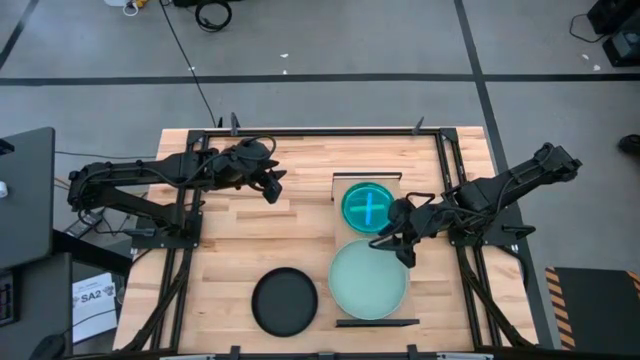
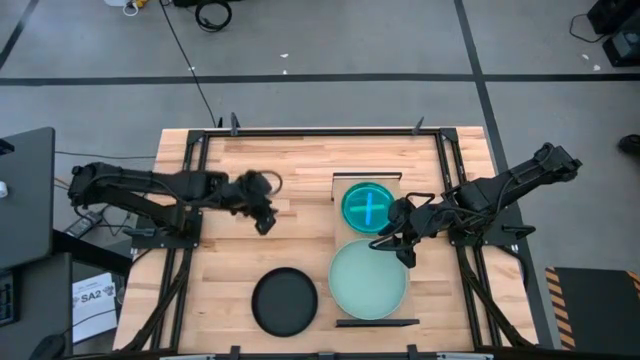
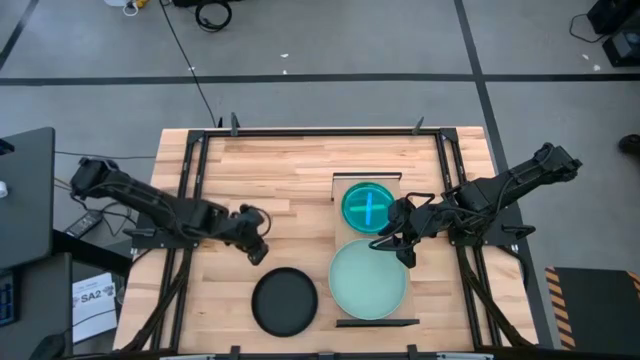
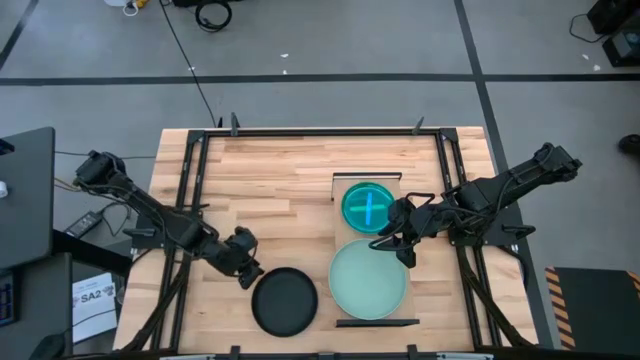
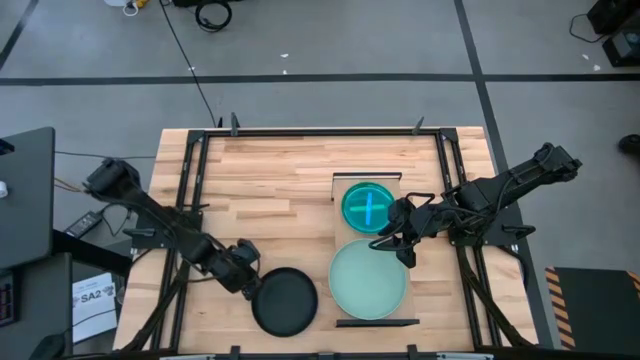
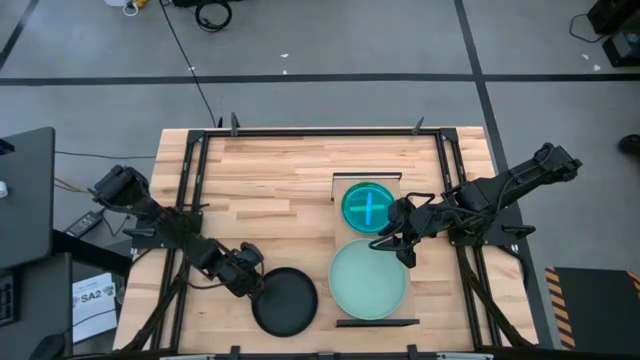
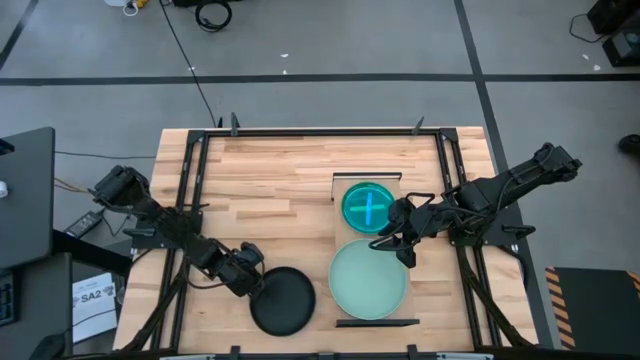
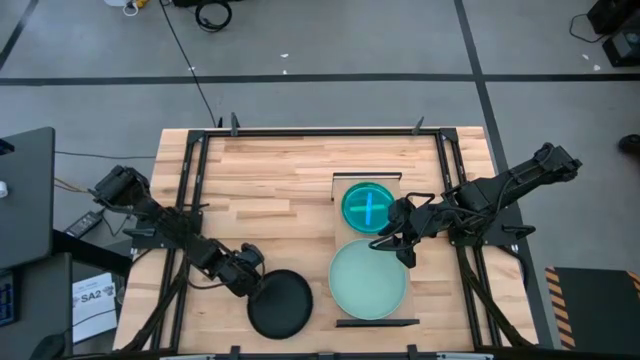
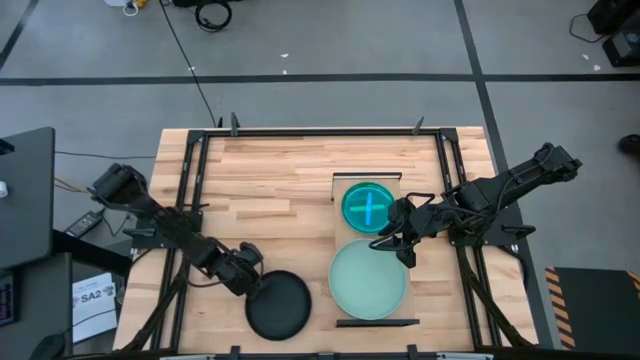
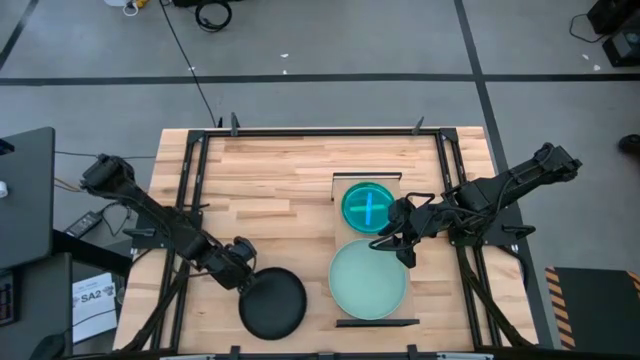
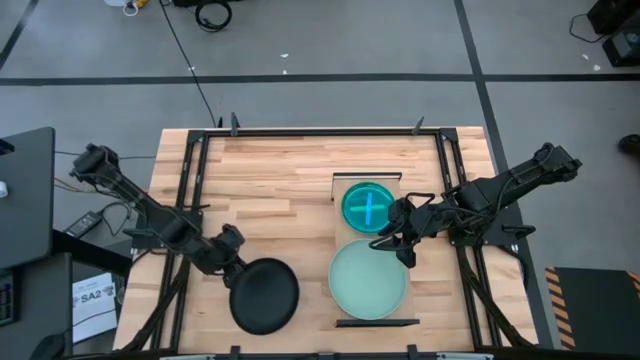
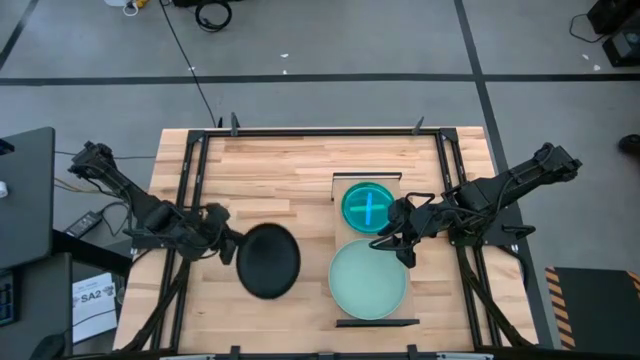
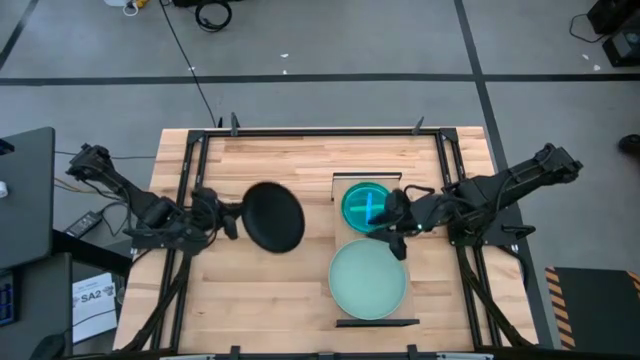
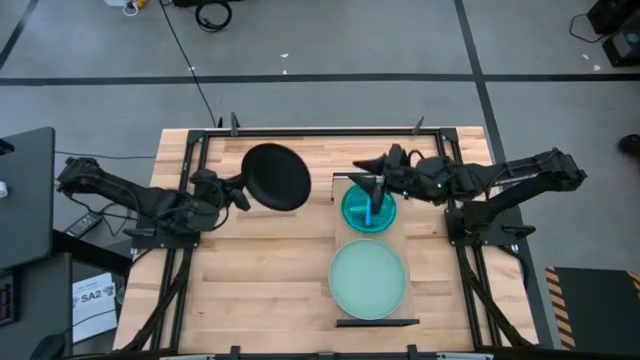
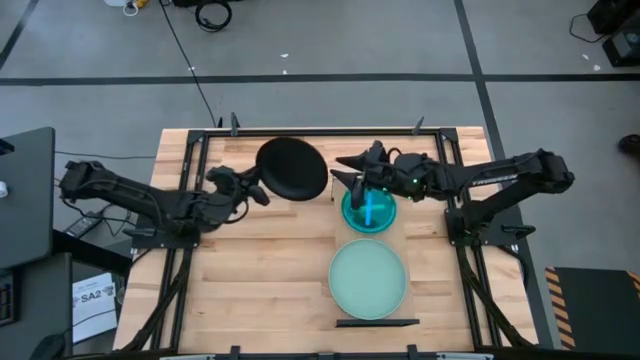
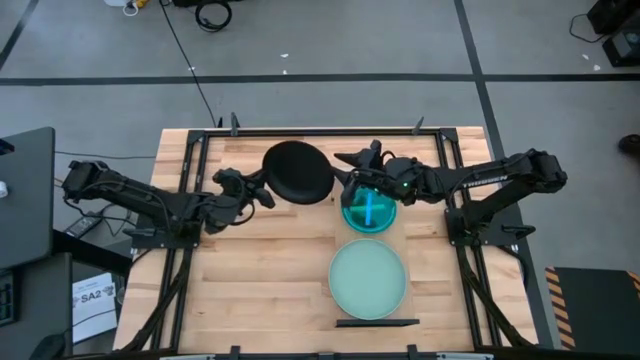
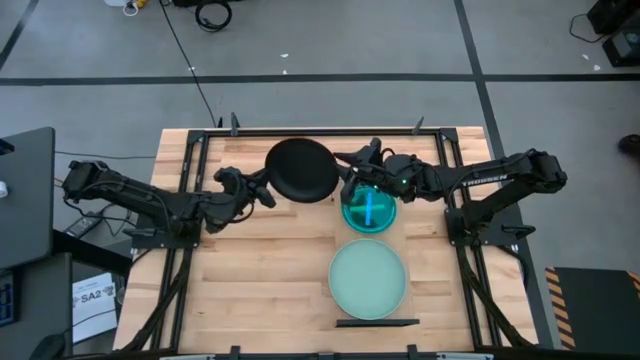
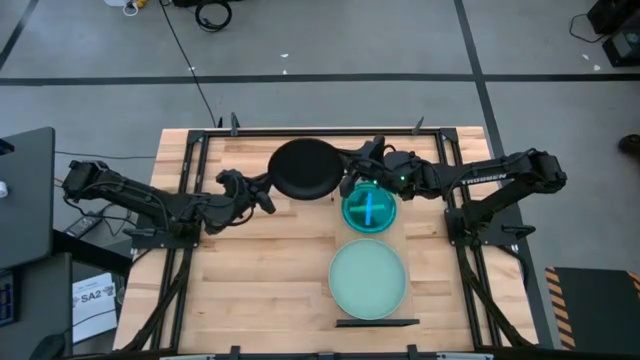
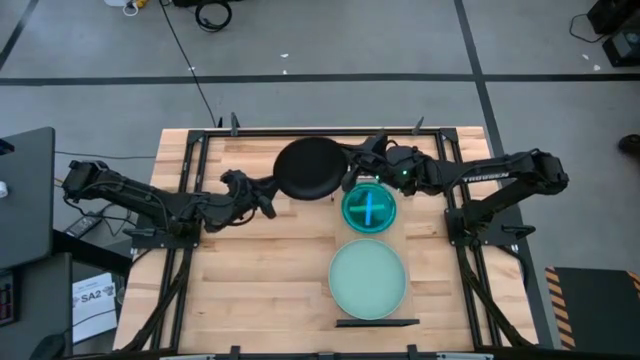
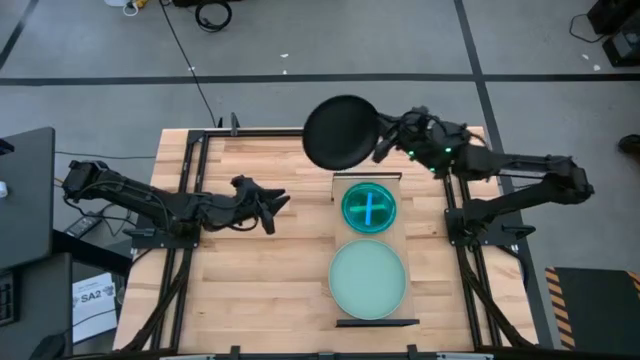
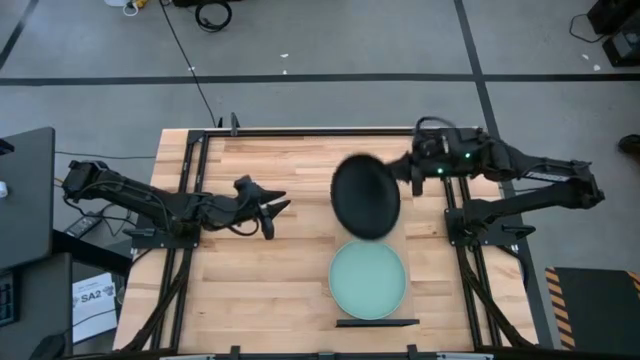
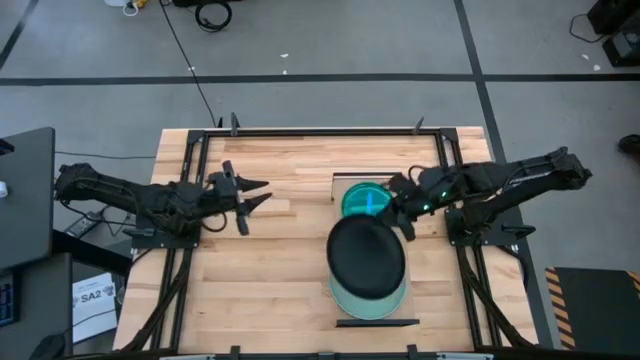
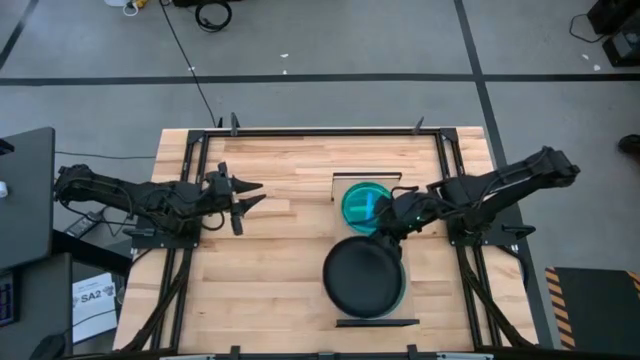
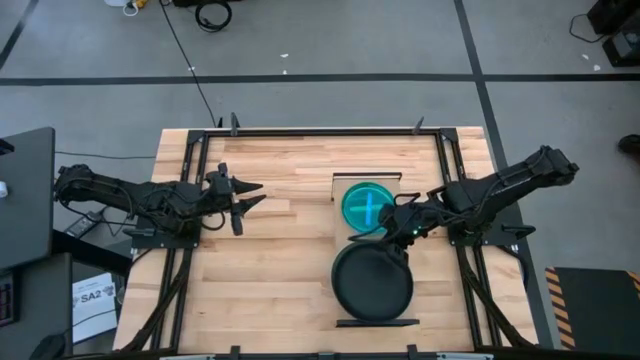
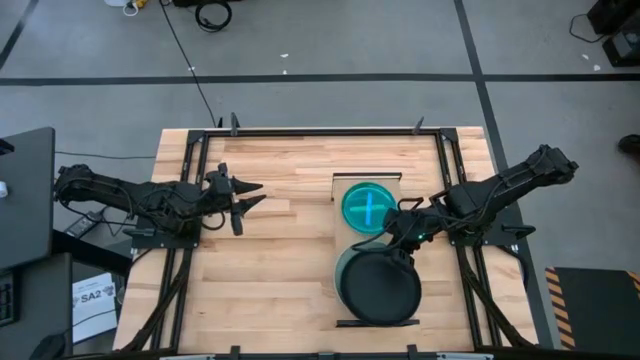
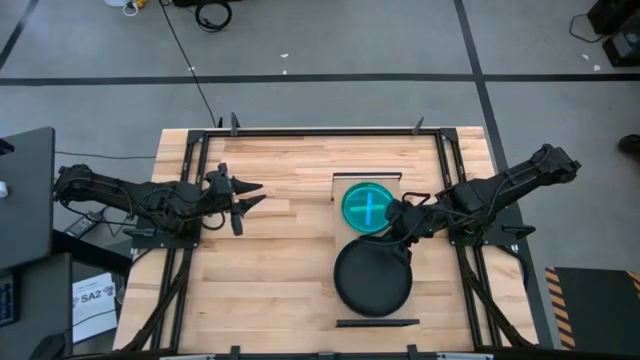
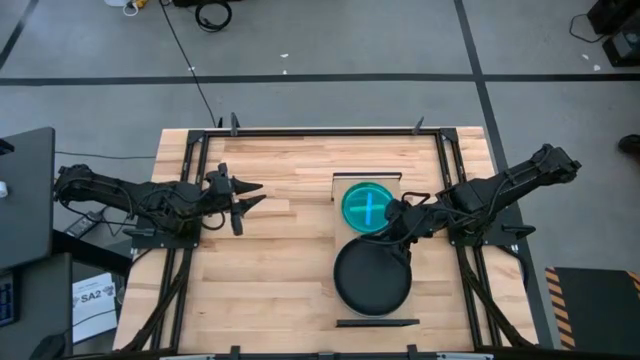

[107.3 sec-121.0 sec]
Task: Place and stack plates onto a shelf
Put the black plate on the top of the gray plate on the shelf

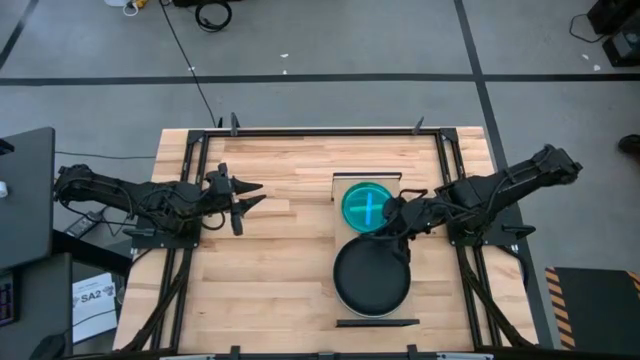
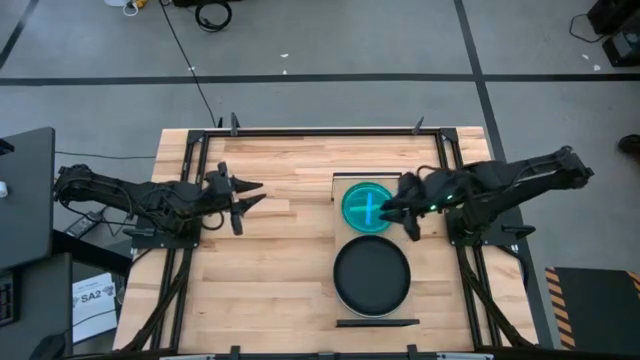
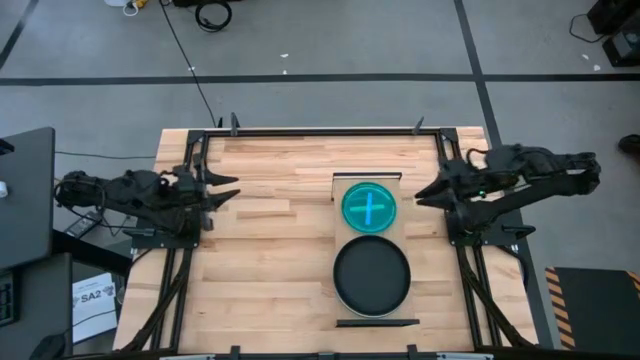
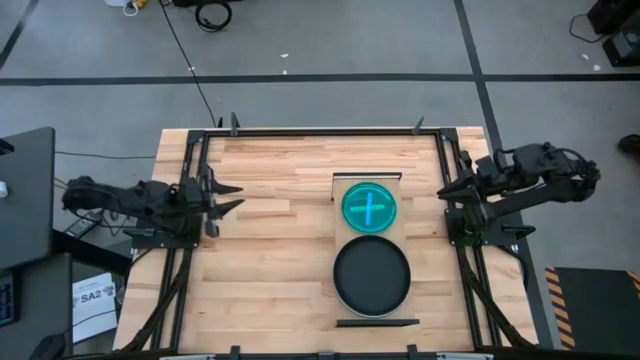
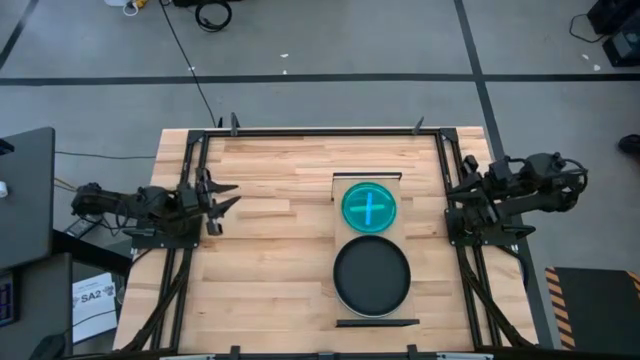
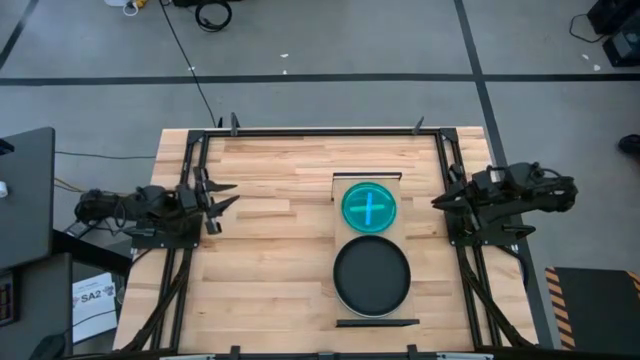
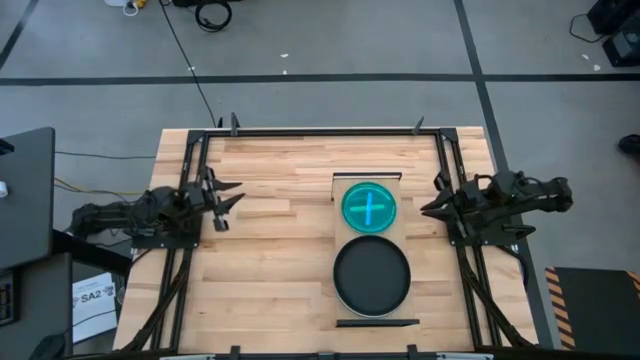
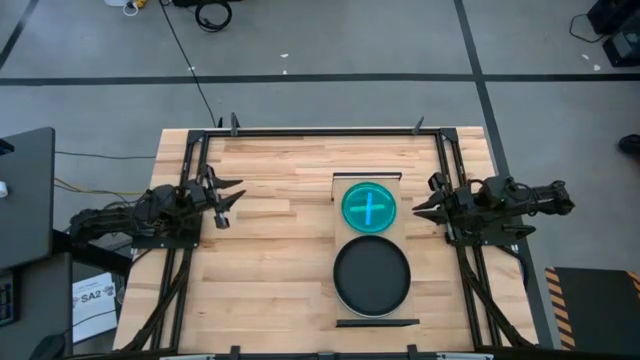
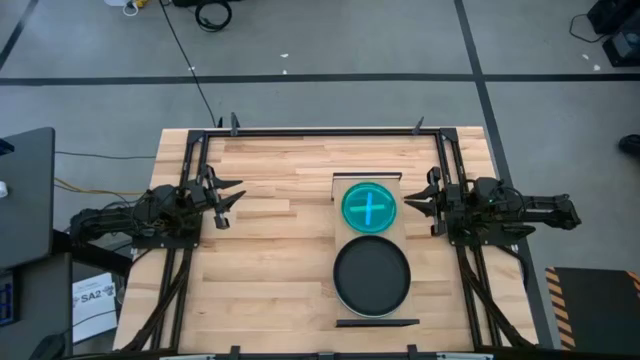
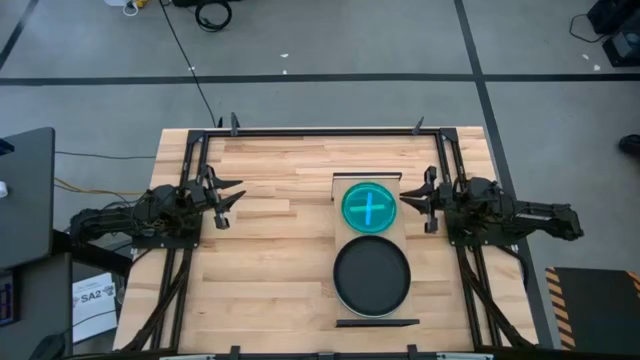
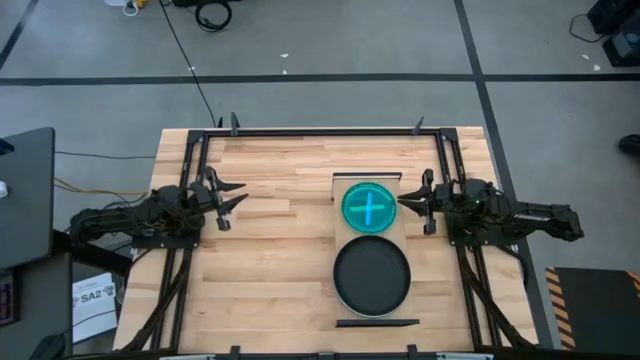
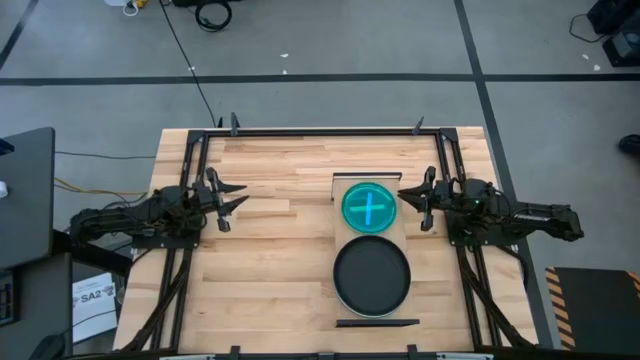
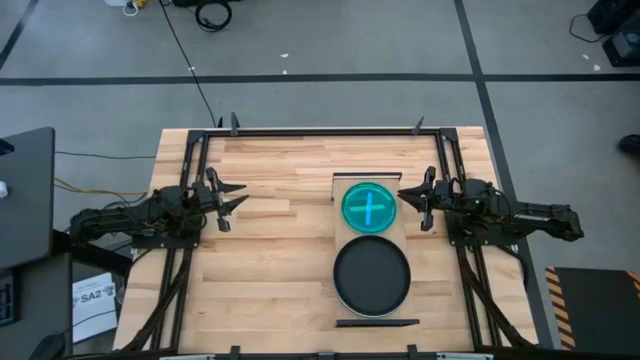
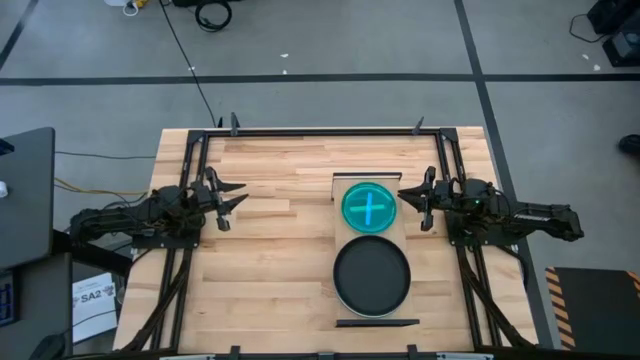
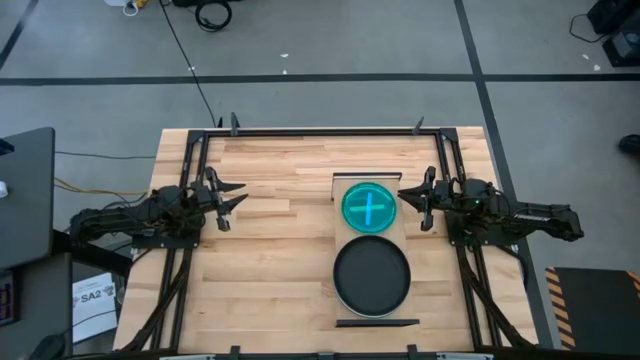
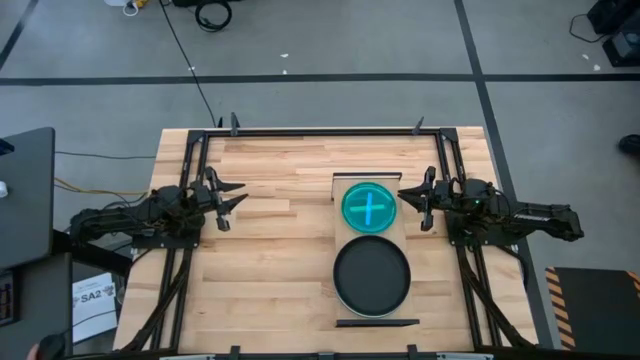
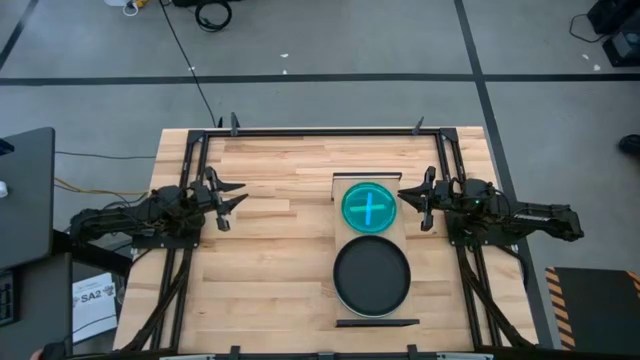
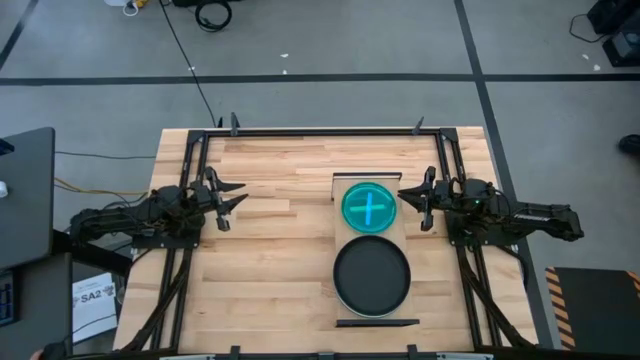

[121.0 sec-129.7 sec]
Return to Home Position
